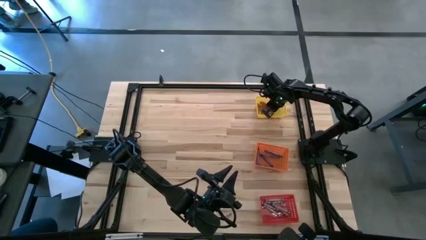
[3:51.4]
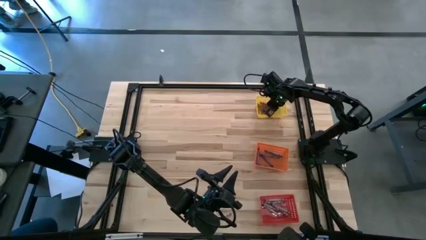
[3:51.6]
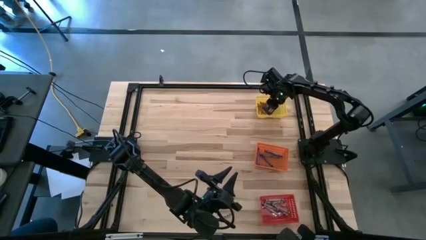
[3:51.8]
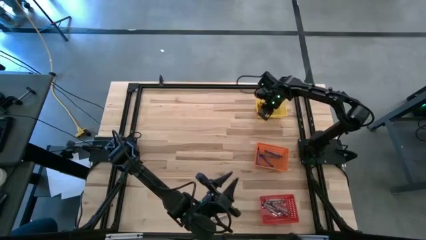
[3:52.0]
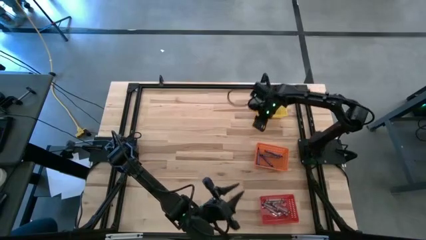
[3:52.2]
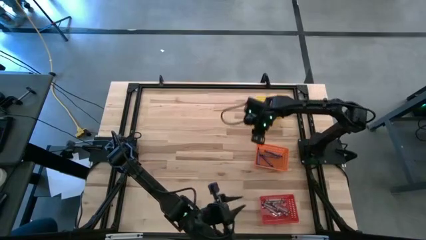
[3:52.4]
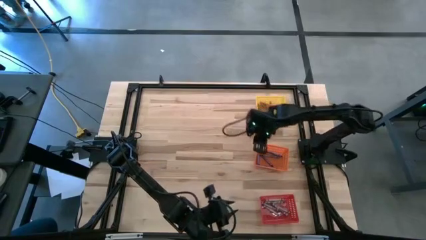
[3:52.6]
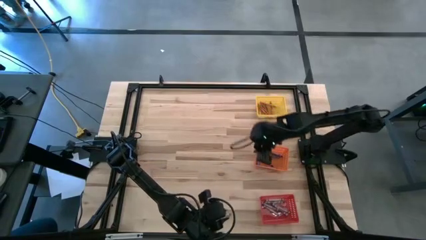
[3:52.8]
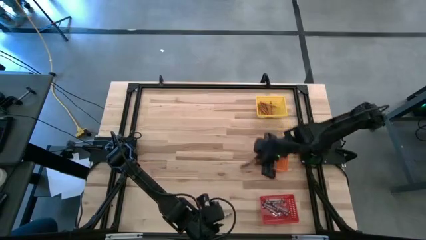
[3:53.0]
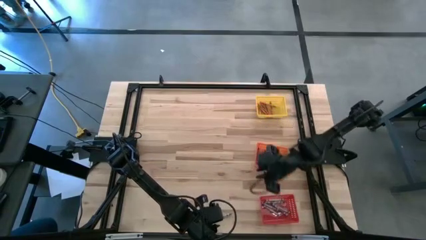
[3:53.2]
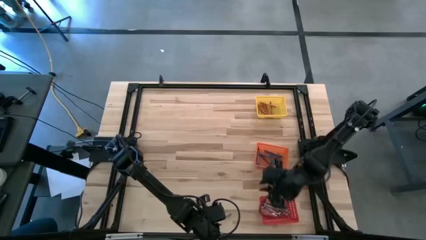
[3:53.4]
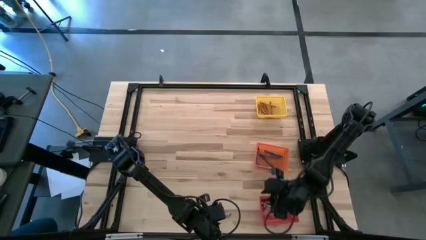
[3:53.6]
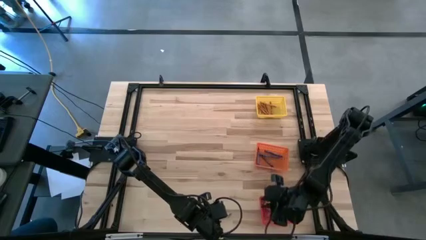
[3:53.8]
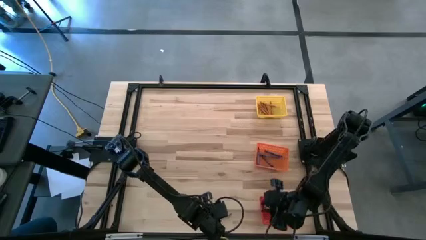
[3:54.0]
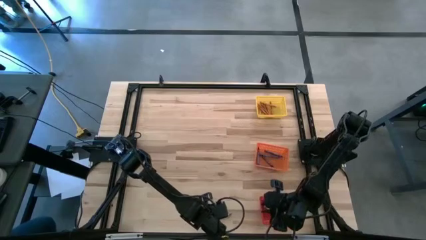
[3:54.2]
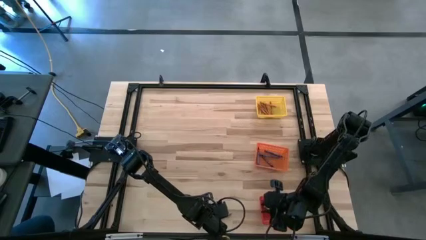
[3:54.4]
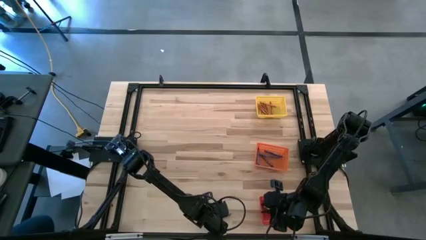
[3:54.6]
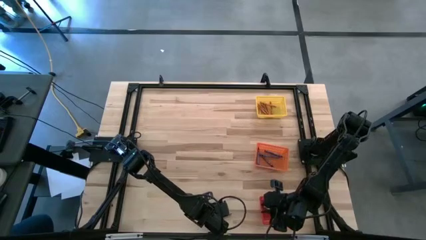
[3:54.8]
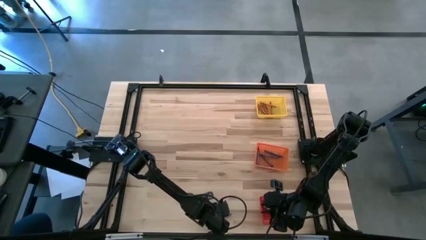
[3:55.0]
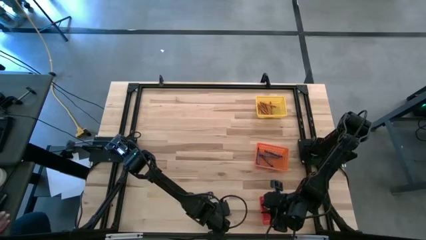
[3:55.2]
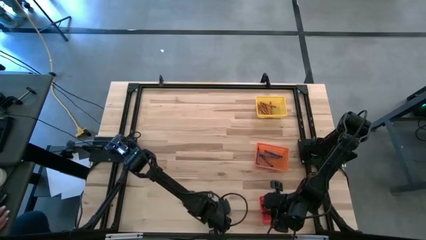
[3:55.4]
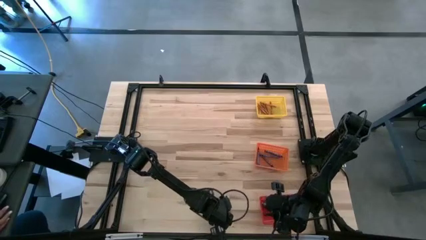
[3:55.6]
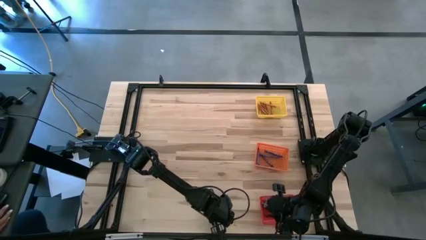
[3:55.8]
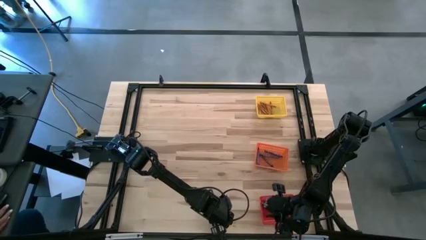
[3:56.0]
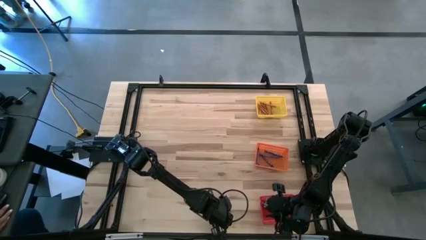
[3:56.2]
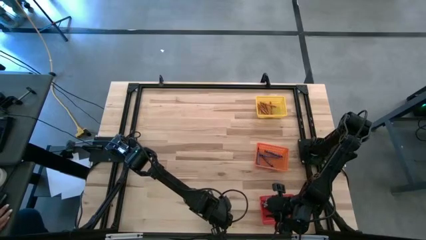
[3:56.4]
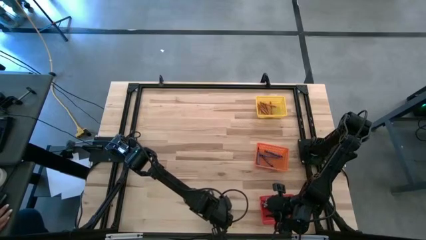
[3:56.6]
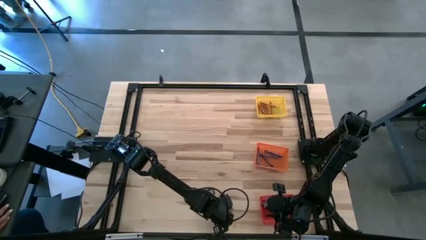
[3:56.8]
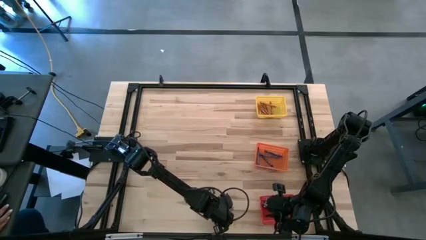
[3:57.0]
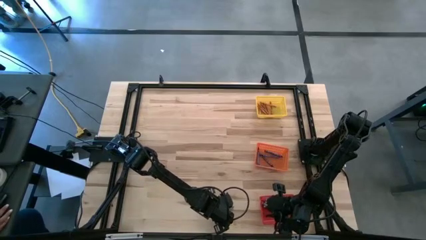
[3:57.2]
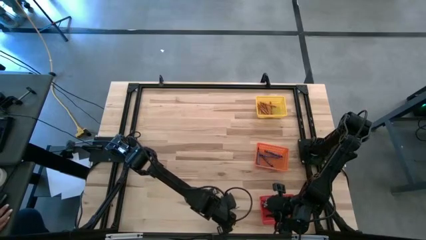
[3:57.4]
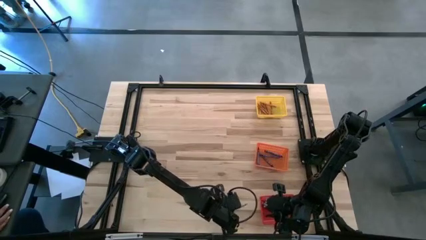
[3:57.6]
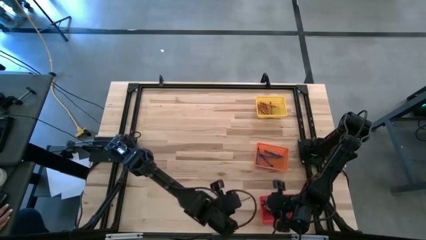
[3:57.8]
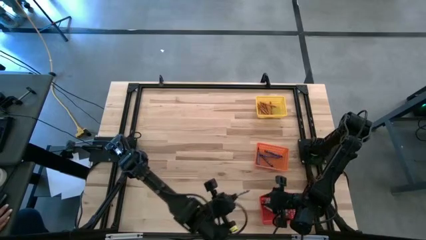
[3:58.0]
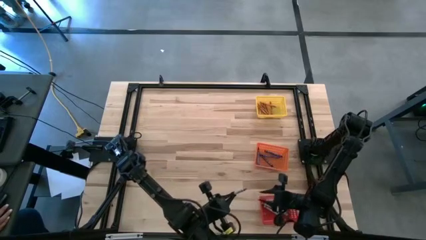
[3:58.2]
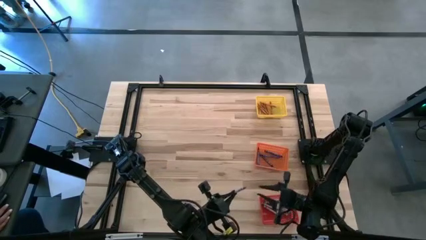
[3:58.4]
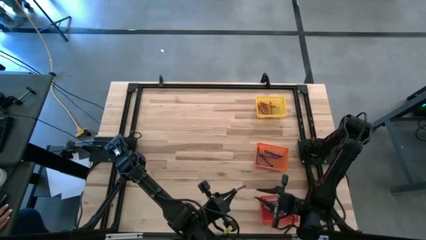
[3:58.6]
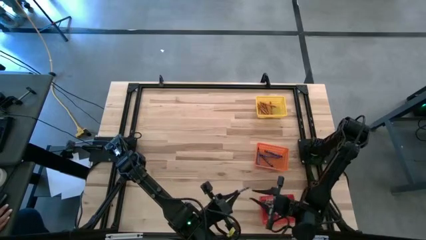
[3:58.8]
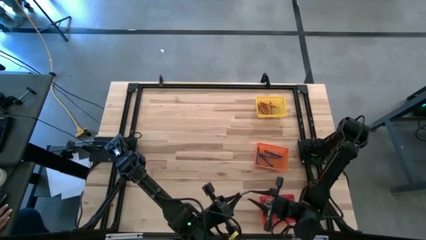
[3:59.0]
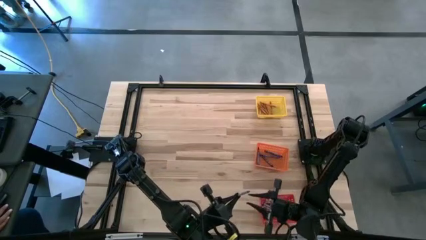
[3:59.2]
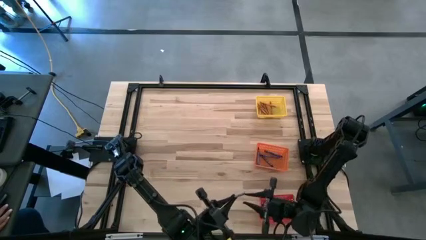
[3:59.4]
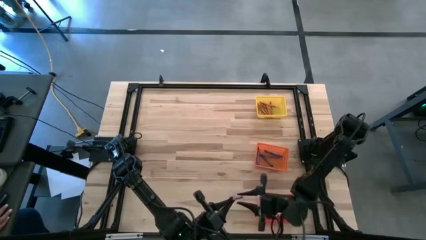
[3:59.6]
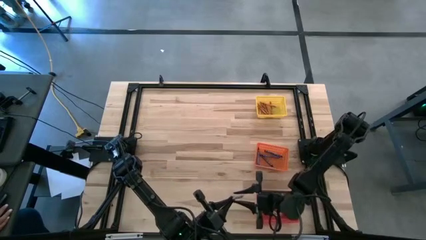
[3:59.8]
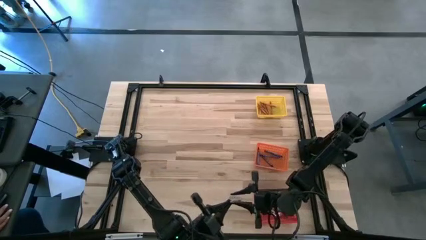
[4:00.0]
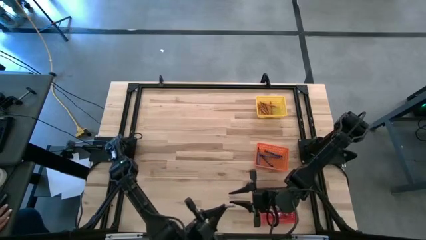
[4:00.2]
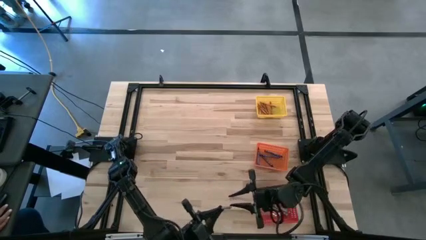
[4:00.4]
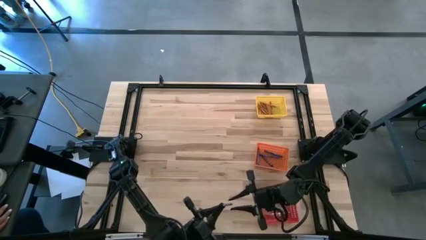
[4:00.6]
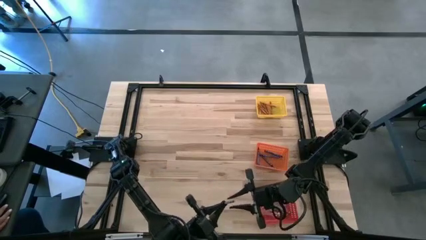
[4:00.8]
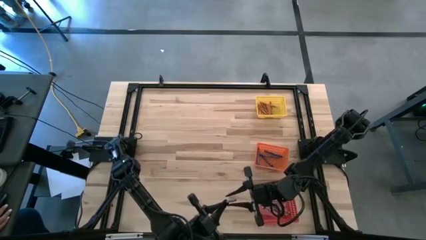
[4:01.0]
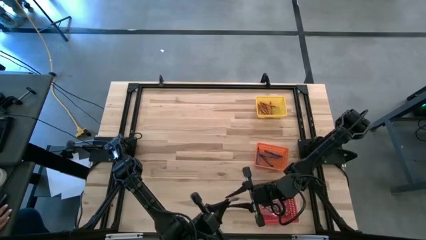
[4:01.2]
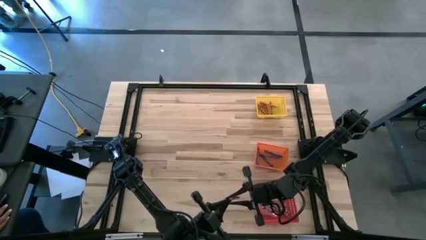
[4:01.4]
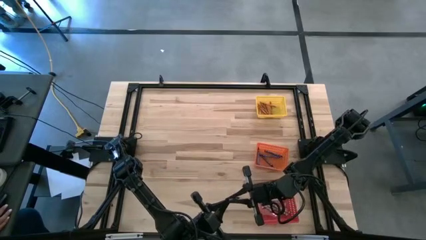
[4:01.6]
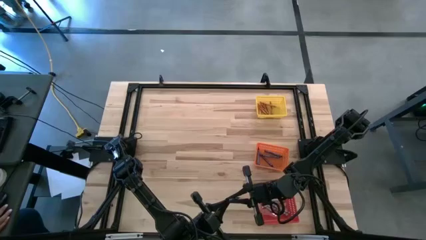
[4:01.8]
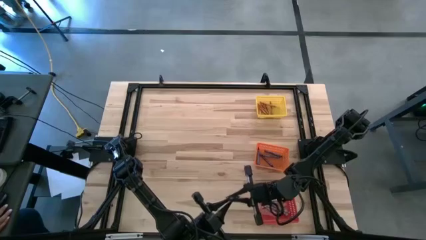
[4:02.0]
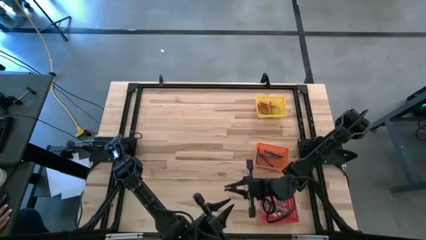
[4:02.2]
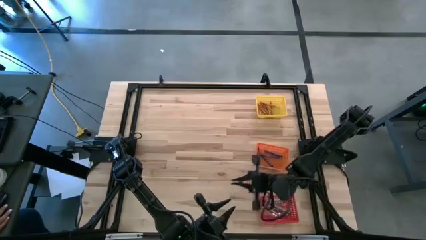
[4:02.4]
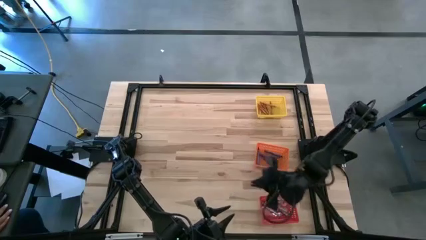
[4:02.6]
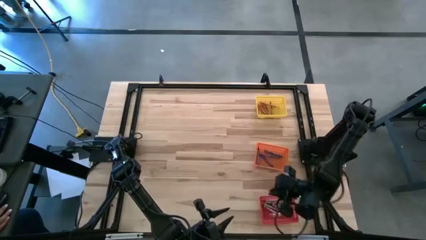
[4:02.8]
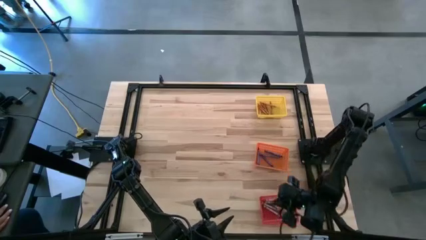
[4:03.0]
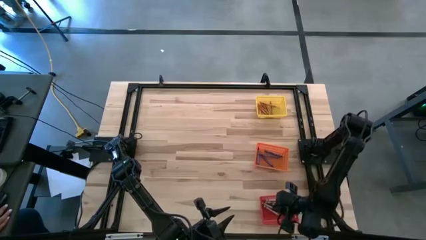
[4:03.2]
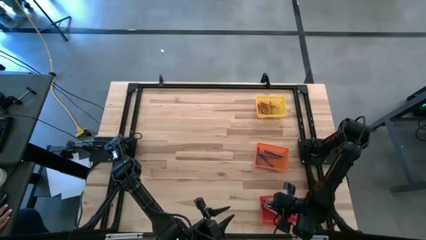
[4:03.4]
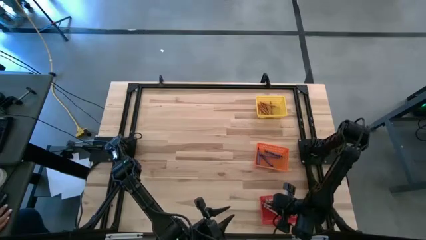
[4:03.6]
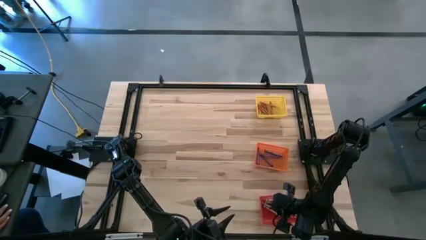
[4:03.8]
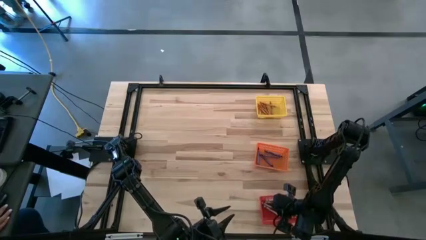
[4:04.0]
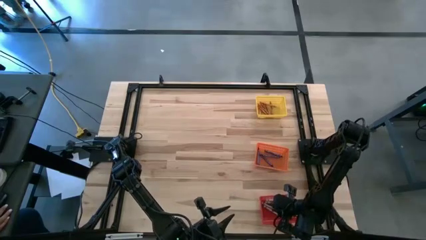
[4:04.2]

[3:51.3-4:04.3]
Task: Sort crayons
Put the gray crayon into the red bin
